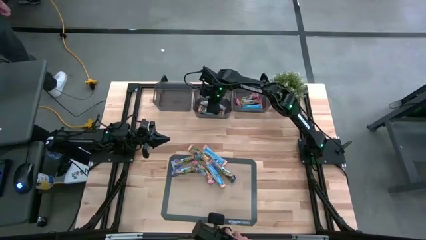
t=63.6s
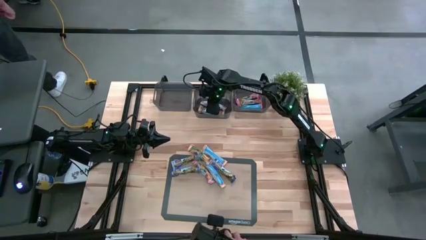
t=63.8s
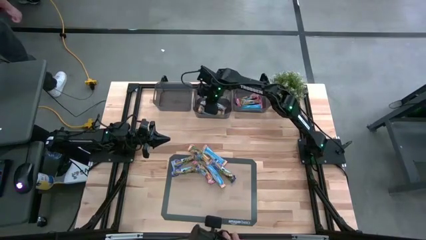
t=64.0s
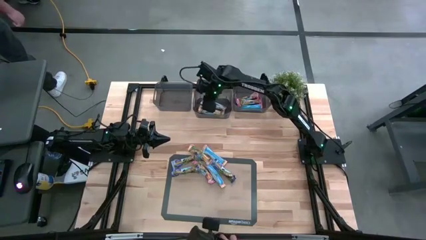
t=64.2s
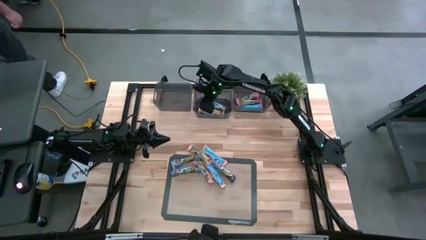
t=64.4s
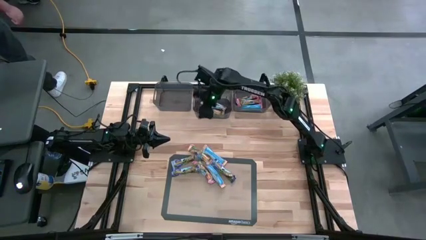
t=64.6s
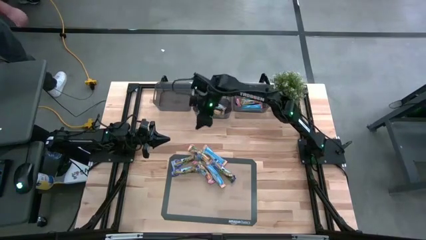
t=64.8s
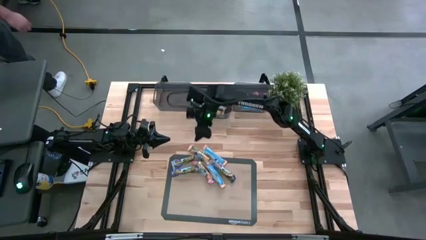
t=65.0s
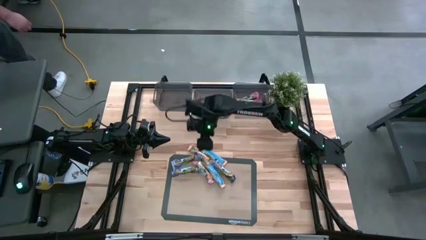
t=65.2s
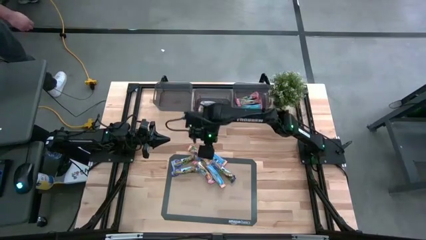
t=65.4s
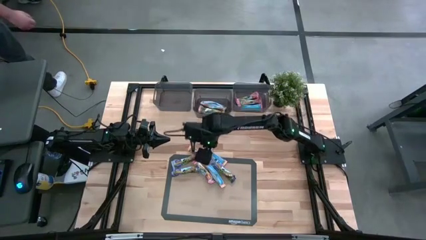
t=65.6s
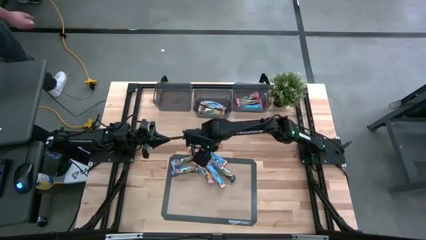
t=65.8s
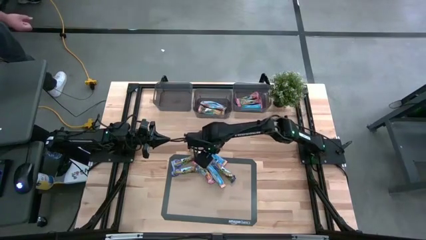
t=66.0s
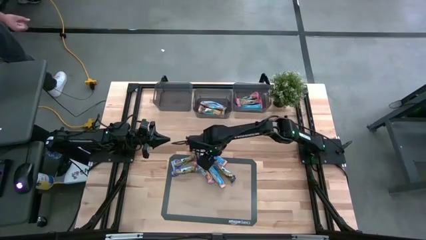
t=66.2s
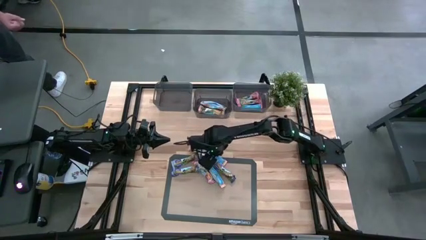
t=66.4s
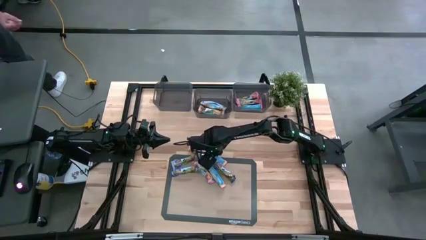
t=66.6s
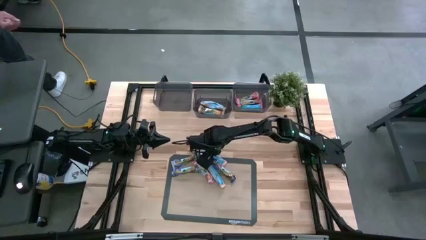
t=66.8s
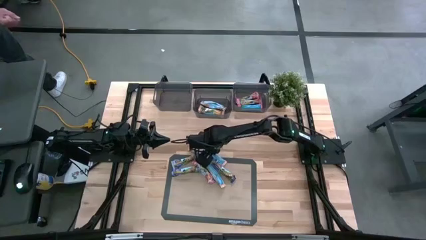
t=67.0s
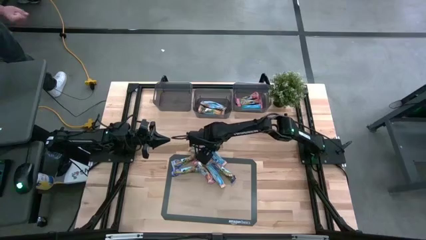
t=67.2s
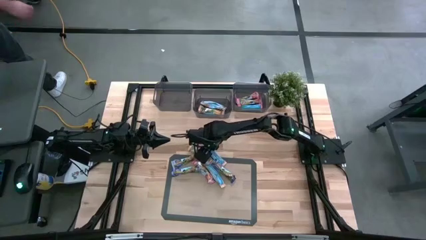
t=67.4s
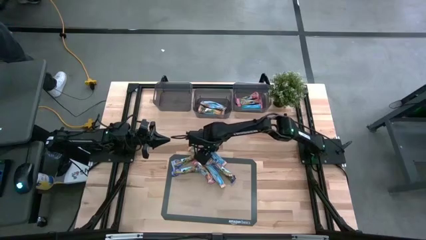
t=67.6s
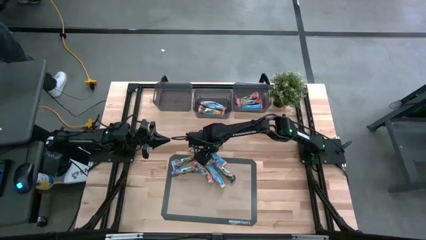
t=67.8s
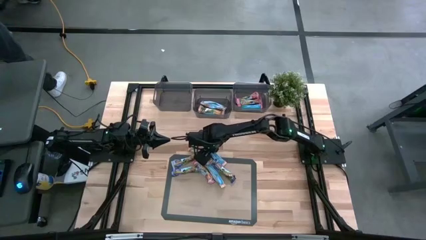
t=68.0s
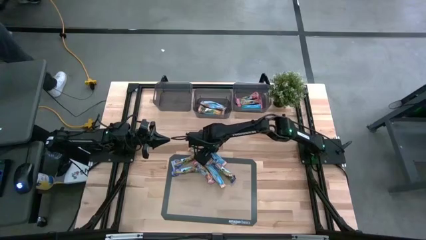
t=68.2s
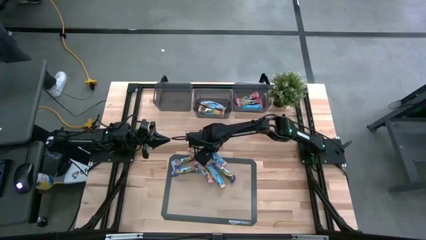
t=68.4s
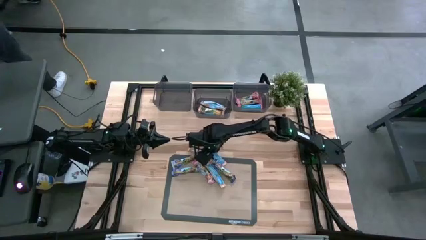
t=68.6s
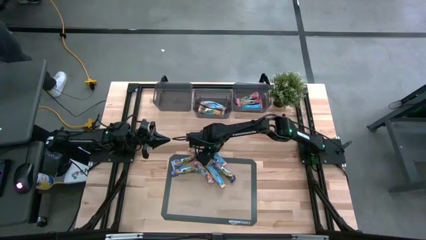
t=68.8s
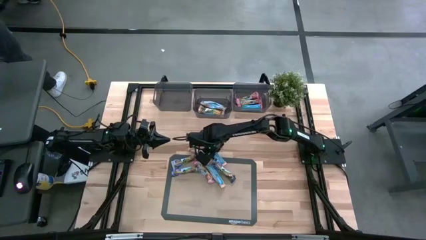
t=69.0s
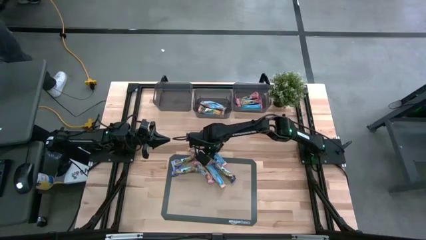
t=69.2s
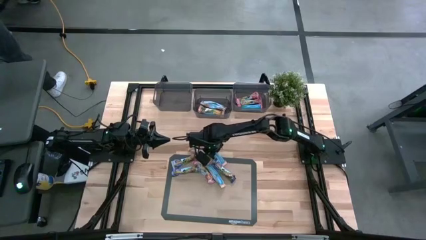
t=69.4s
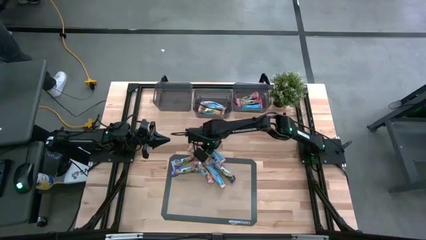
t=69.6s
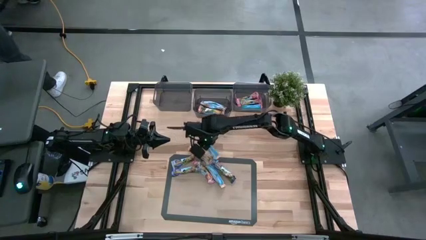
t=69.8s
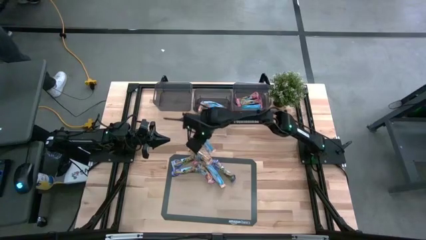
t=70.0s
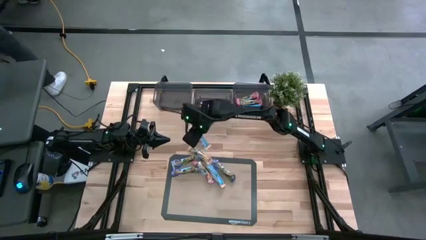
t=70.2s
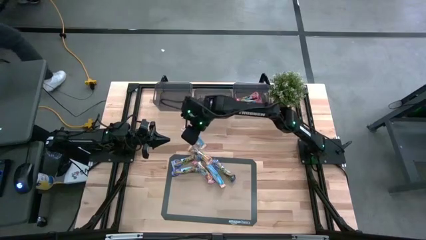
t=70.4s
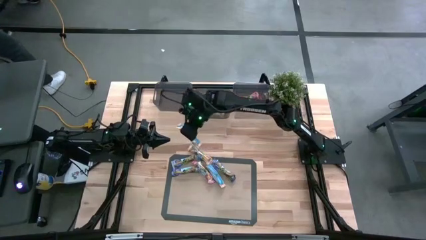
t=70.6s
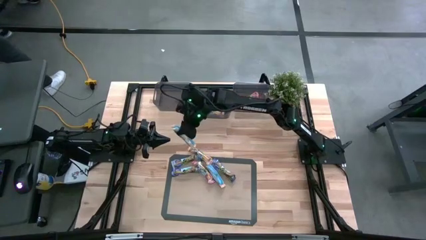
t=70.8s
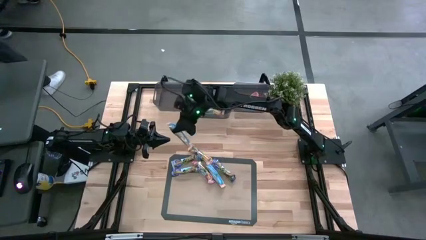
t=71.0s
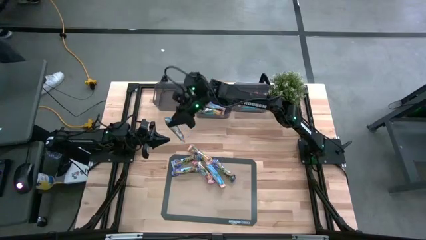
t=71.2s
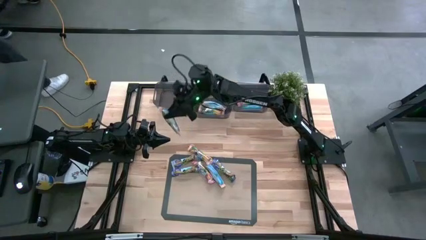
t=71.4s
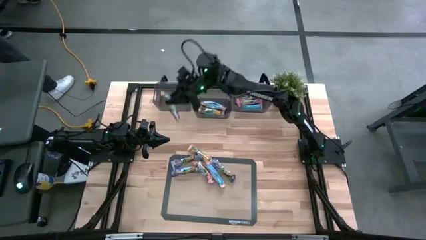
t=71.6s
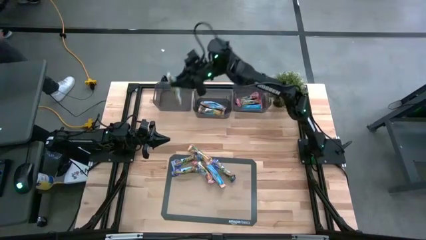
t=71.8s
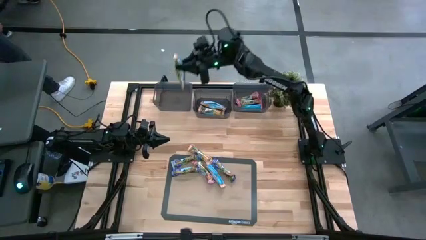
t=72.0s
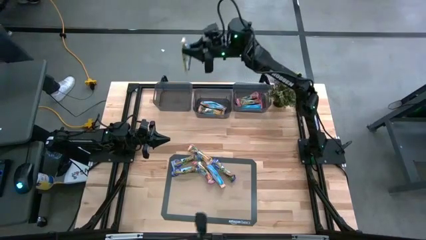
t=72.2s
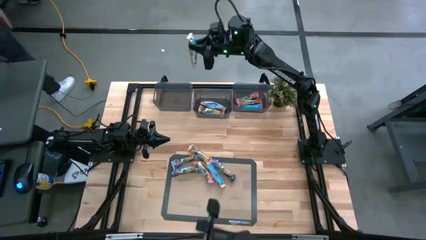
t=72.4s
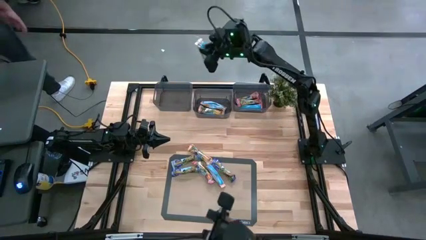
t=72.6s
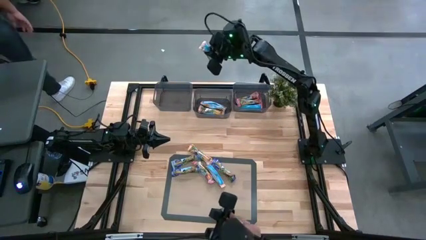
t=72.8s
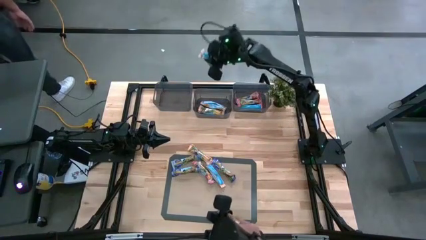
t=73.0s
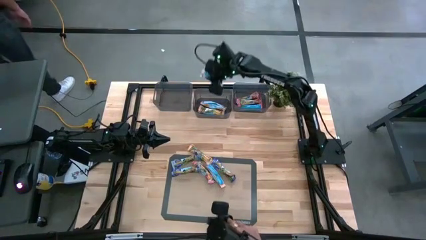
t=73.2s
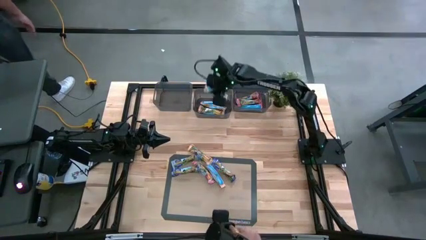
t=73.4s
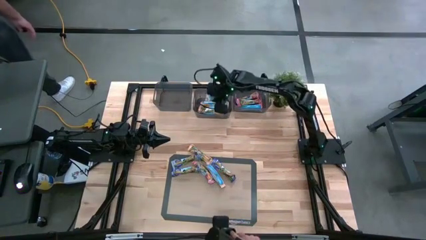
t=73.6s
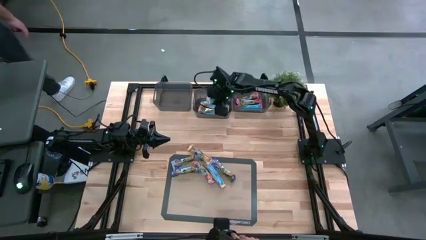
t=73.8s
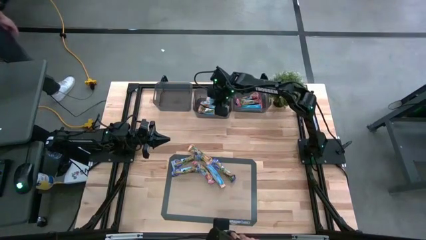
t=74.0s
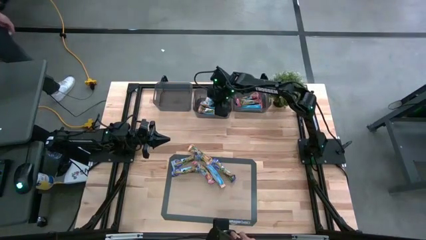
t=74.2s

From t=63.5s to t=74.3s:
Task: Pick and place Granola Bars by type
Put the yellow granola bar into the center black bin

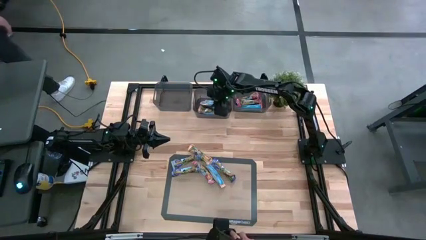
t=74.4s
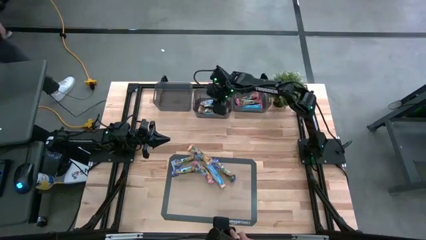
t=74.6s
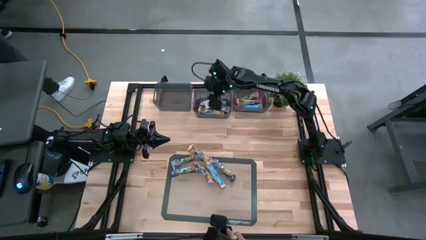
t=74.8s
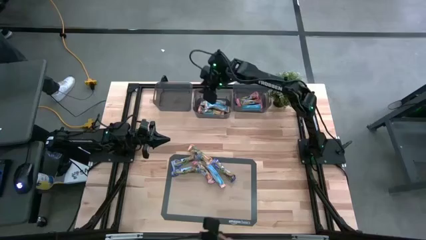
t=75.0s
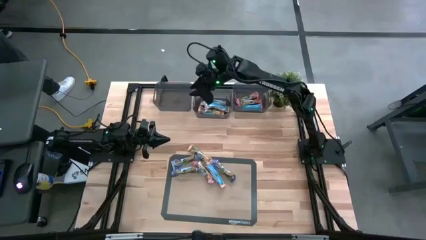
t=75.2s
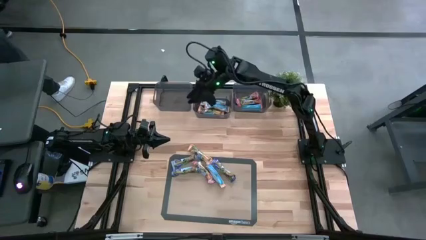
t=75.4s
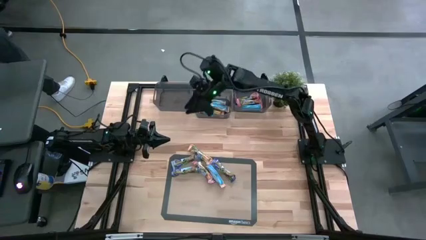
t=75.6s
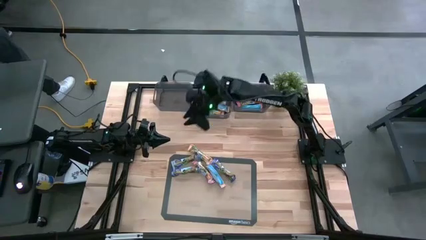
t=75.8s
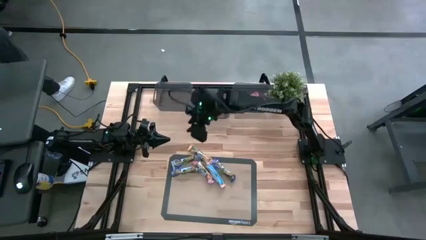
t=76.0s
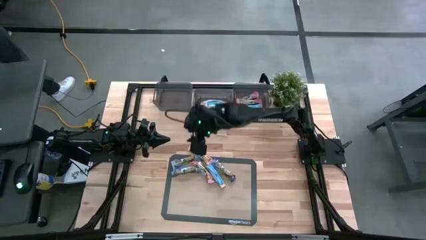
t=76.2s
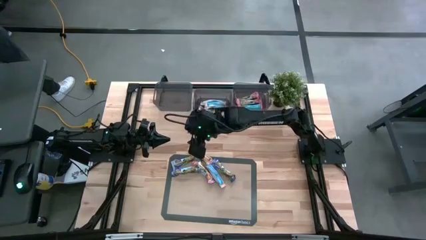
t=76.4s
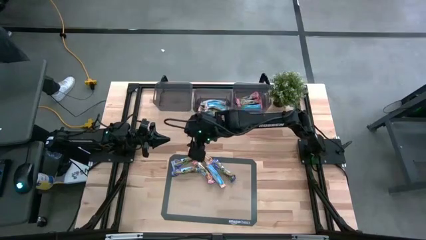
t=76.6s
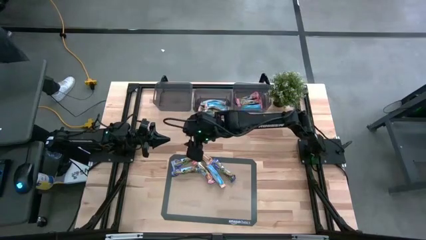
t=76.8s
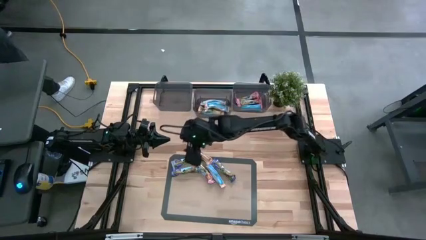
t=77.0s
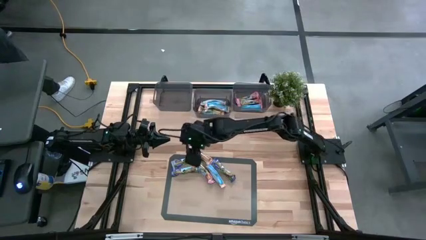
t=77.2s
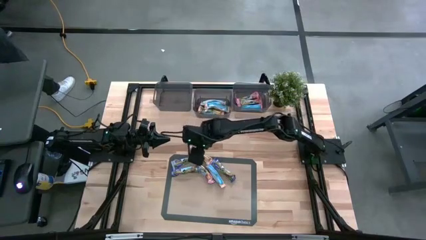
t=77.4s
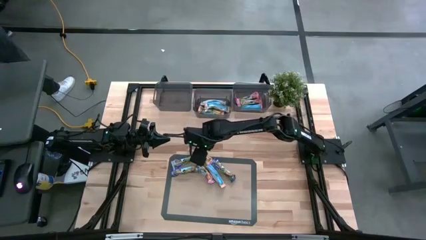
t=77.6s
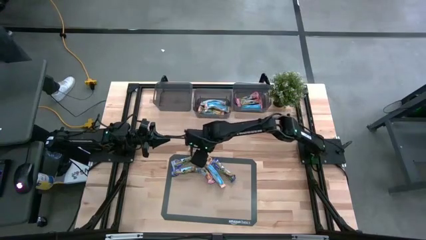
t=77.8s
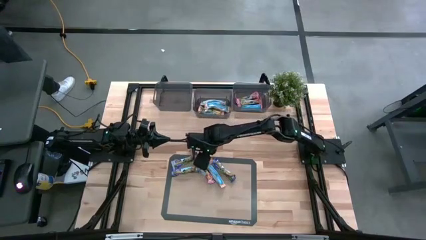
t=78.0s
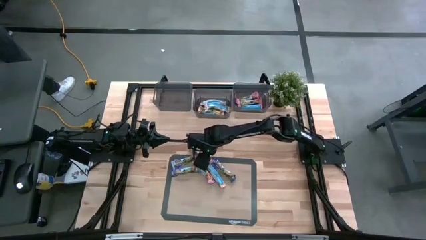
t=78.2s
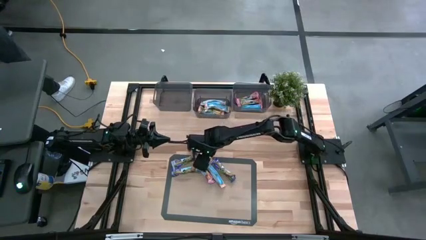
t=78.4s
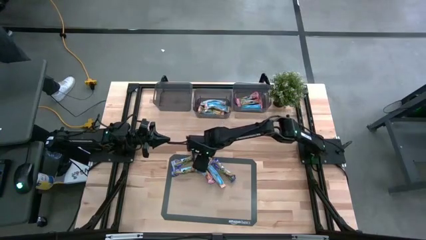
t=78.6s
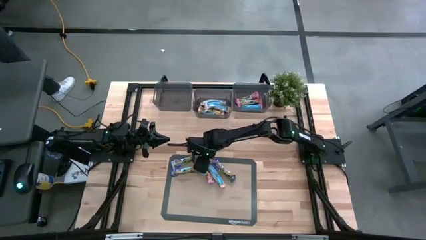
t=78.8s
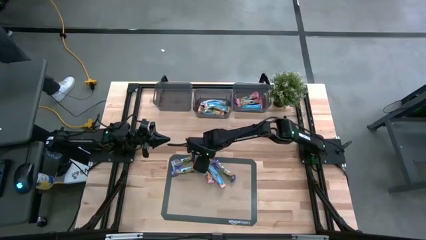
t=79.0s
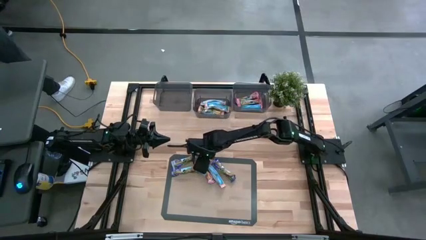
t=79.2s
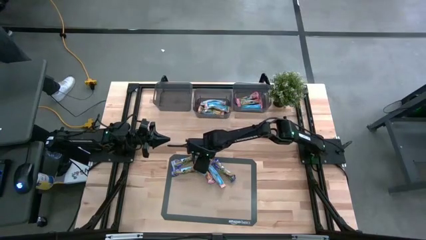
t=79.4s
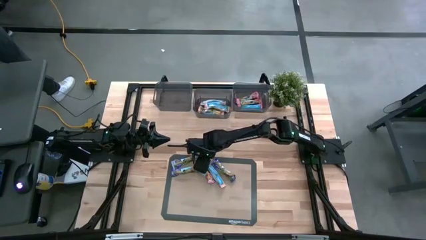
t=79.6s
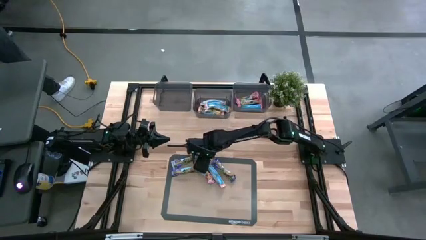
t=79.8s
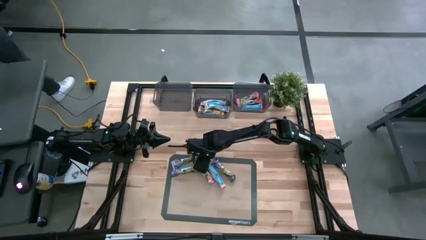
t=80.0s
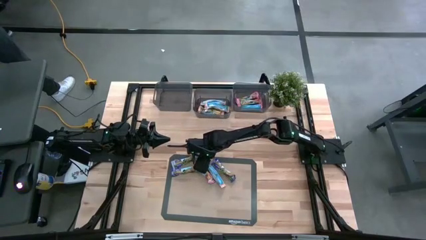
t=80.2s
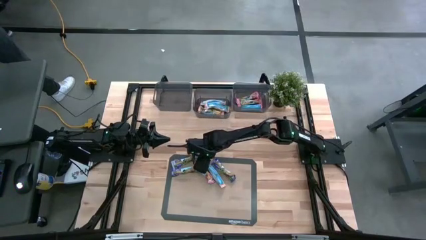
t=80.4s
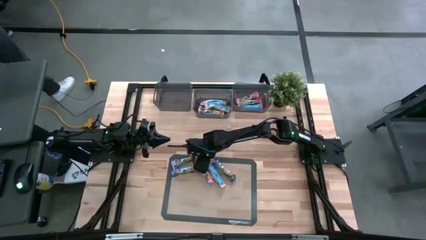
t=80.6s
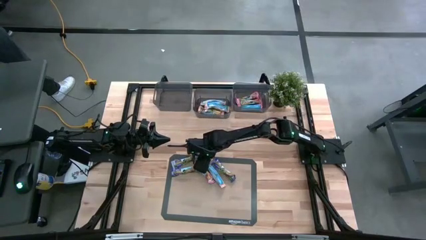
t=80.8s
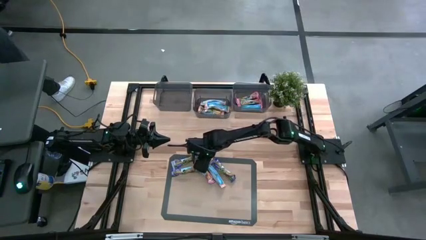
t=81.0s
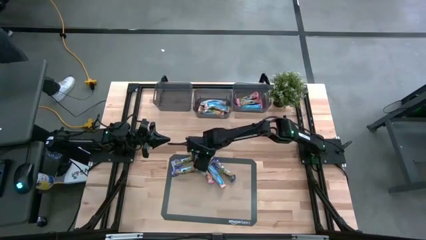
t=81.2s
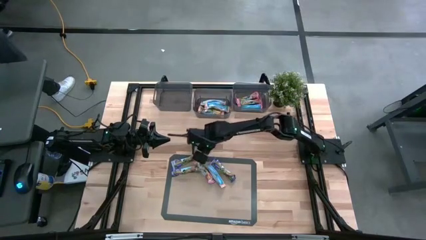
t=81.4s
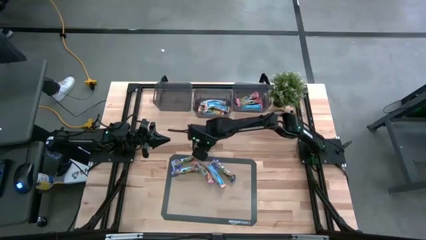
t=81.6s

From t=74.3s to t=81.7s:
Put the yellow granola bar into the center black bin
